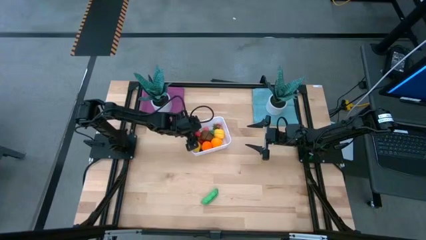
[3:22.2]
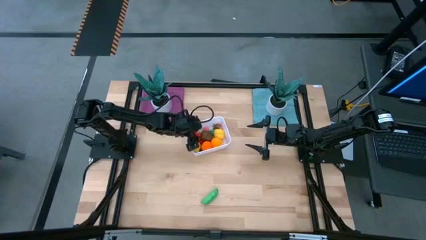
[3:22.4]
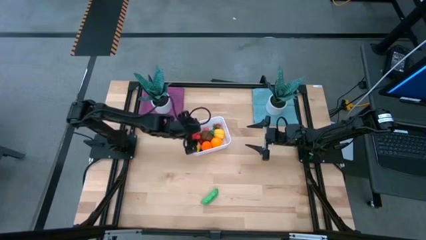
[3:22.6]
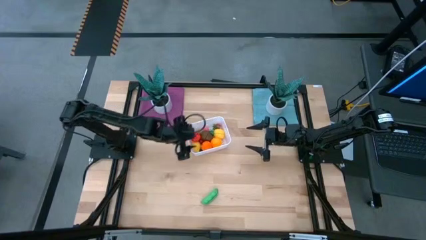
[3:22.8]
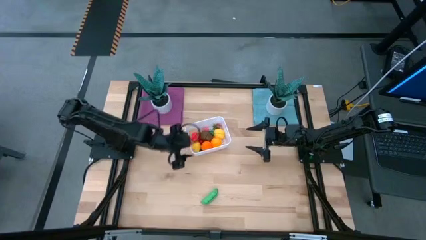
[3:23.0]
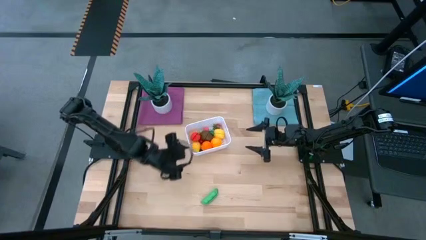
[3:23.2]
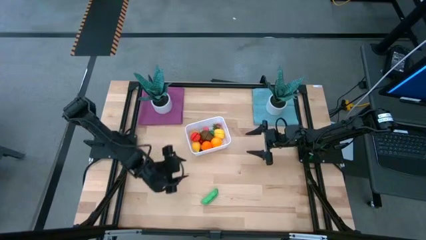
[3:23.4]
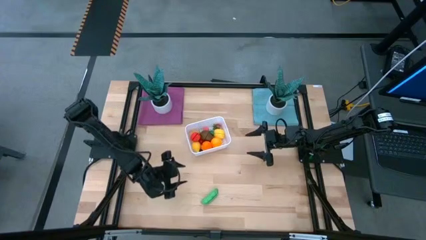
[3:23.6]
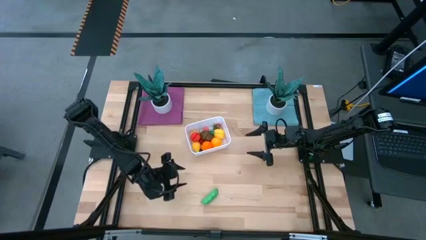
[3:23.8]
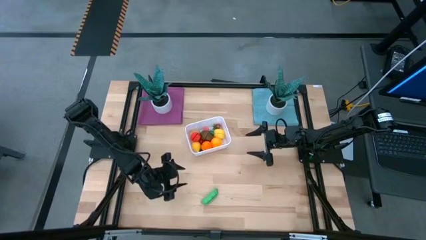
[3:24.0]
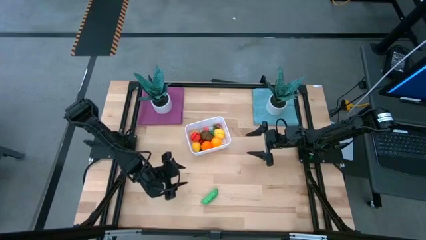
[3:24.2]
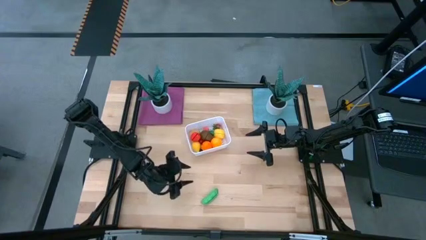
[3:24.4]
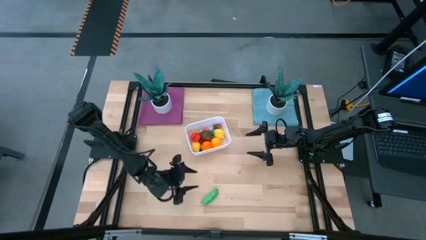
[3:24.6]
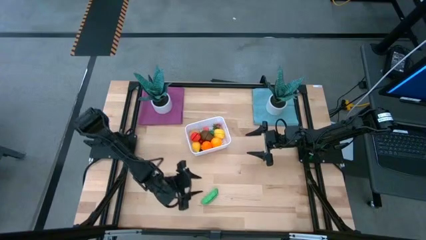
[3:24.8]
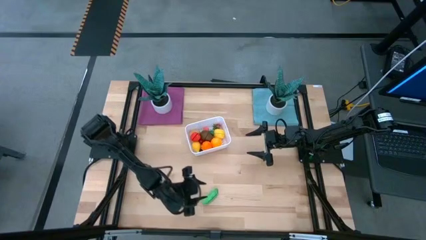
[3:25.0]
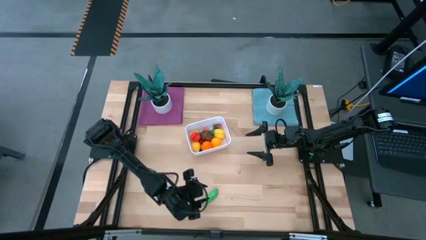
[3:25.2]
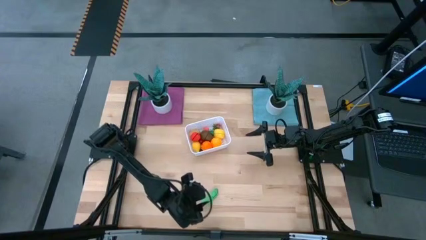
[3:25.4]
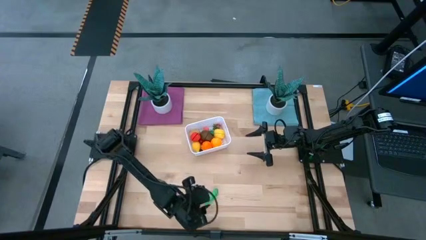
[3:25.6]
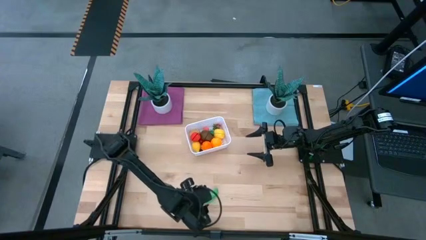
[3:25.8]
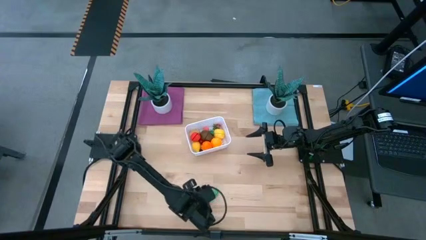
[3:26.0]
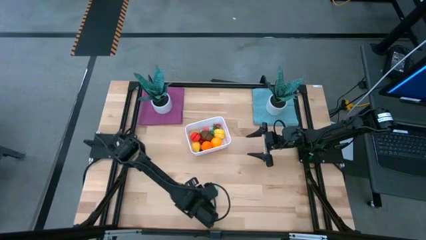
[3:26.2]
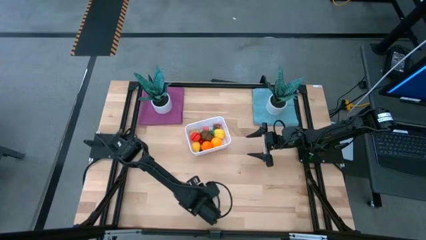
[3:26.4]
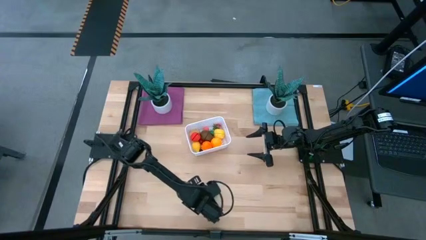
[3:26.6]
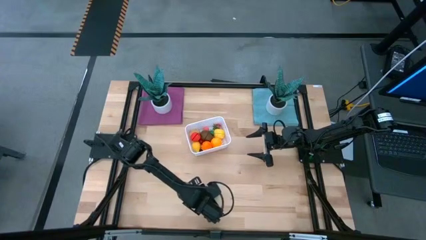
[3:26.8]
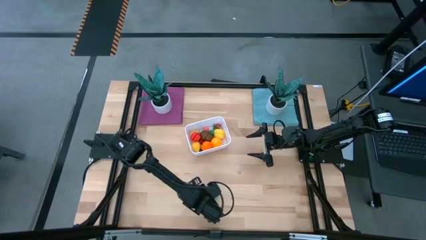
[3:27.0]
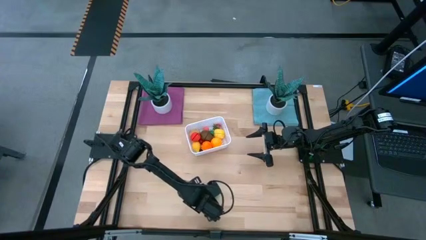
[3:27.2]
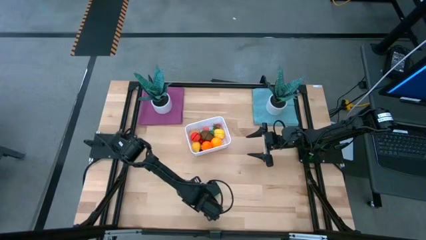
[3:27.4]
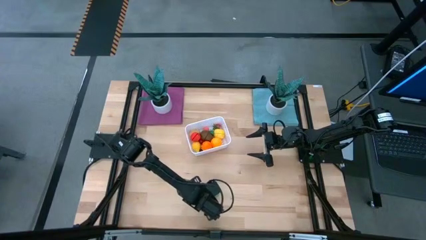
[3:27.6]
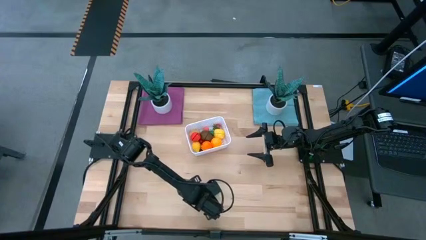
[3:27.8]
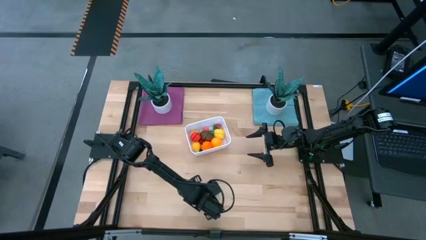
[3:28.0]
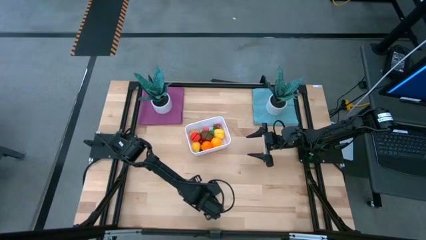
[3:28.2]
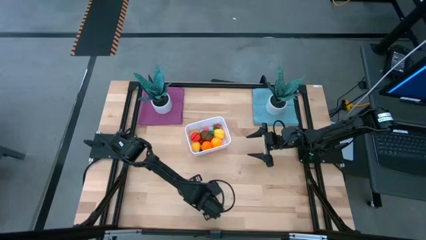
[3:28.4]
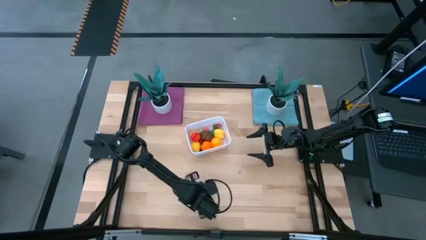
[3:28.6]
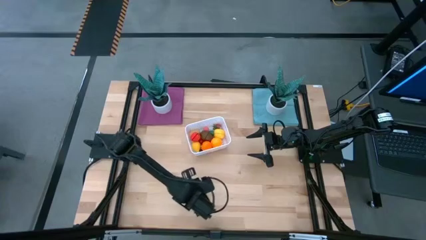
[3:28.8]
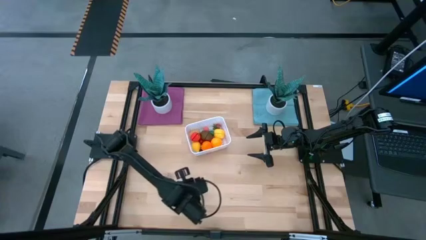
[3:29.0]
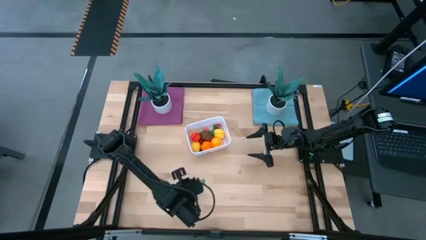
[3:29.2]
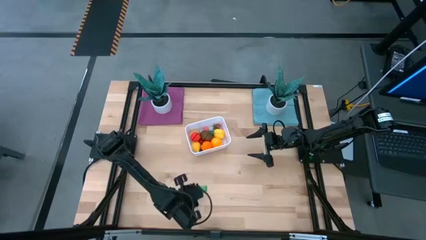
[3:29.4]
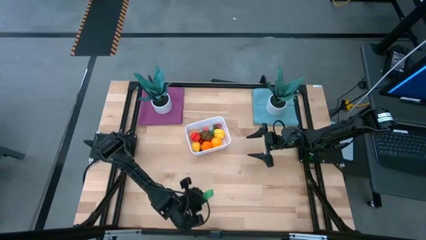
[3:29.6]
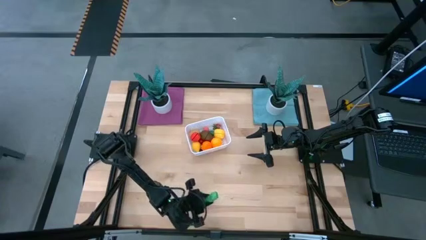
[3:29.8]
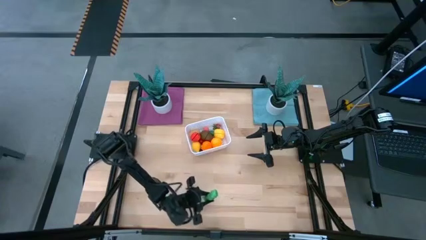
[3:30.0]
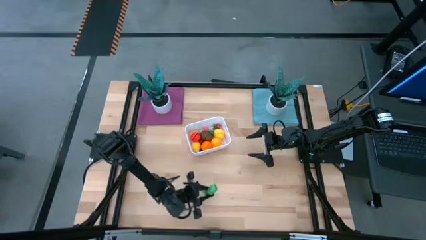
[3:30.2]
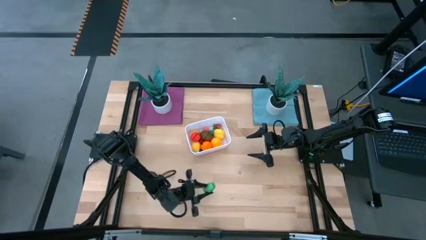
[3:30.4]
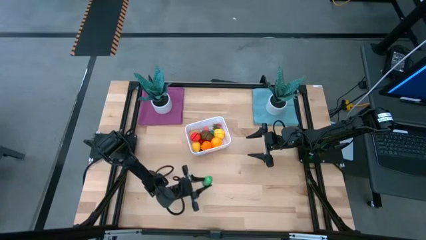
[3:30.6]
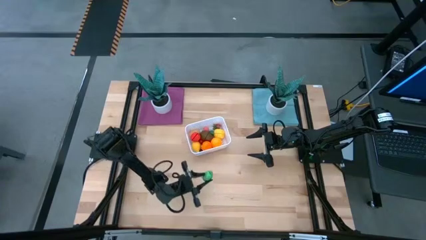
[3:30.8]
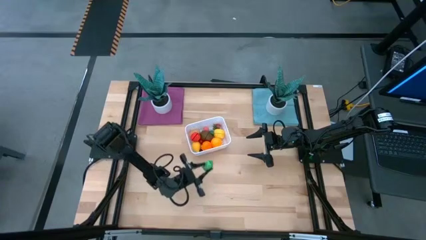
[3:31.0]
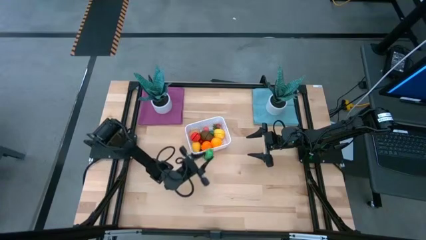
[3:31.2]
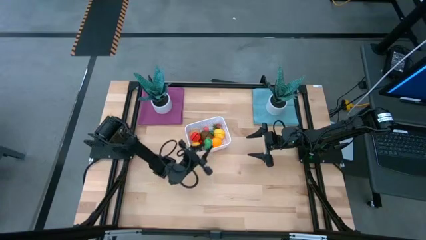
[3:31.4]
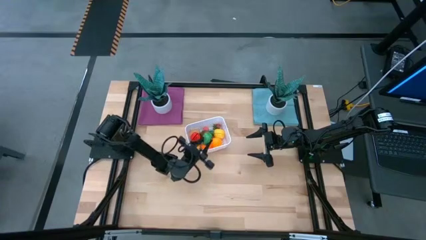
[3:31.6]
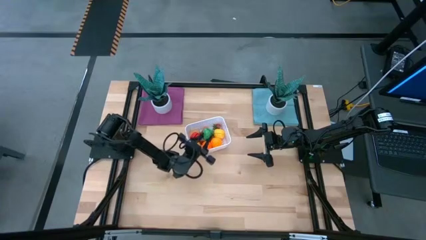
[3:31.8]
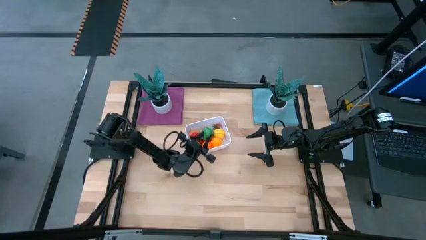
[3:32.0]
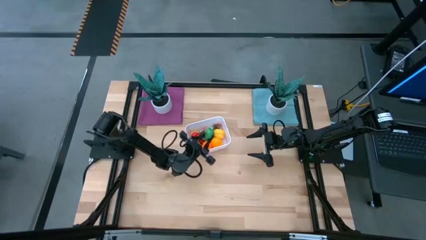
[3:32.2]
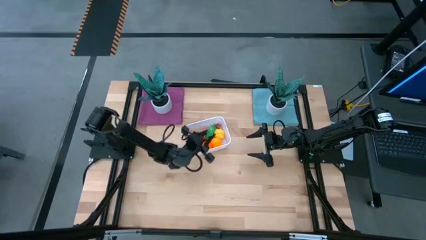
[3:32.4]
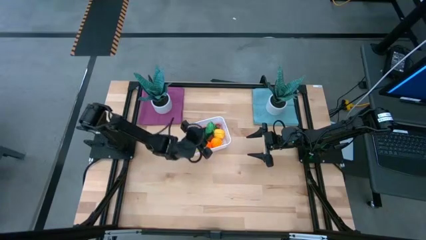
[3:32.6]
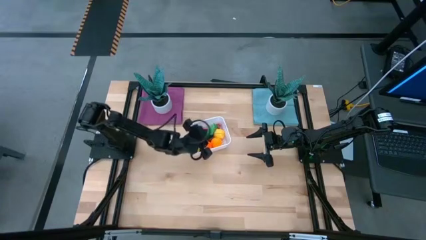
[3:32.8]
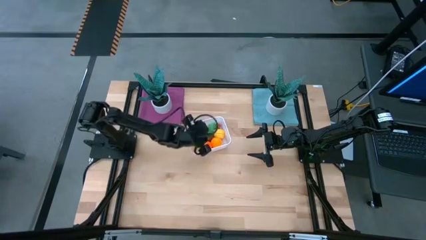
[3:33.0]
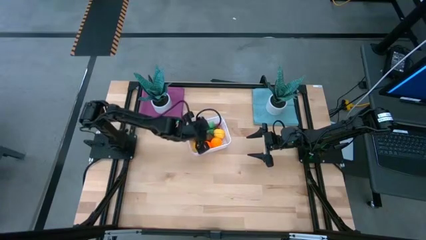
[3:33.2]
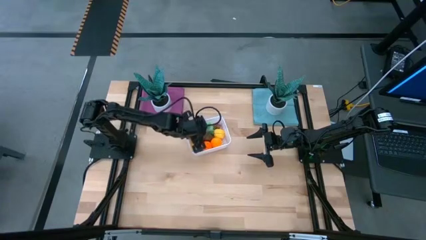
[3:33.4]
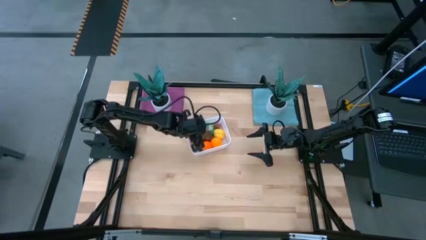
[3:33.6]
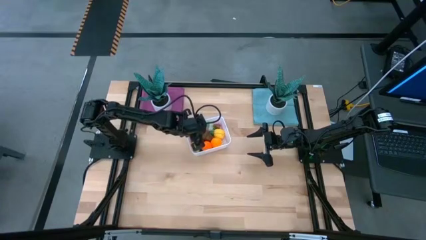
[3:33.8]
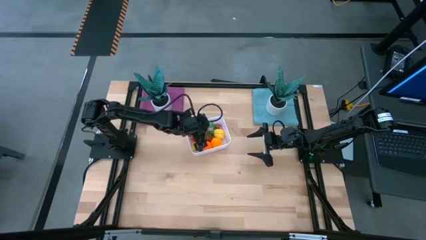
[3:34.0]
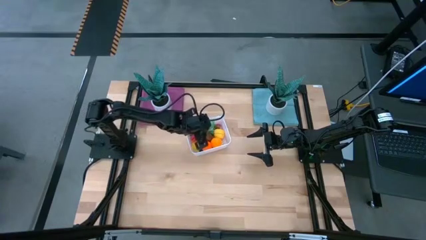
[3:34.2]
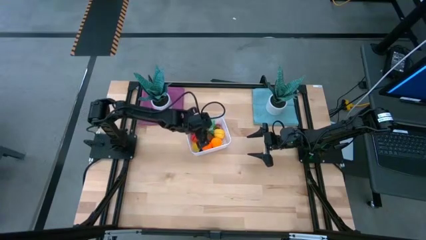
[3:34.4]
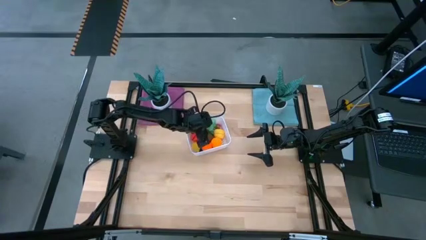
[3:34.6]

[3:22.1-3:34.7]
Task: Pick and placing Produce into tupperware
Put the green pea into the white bin
